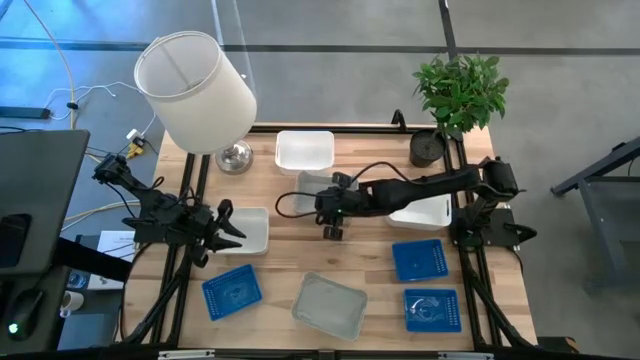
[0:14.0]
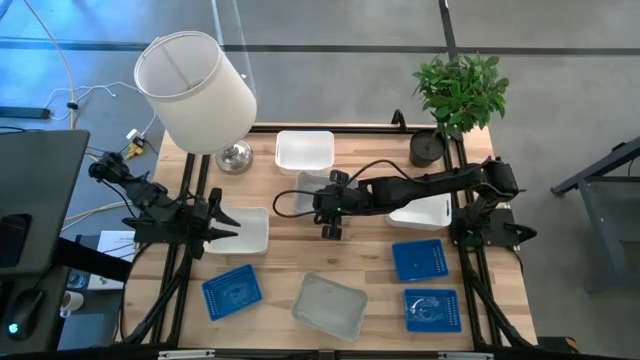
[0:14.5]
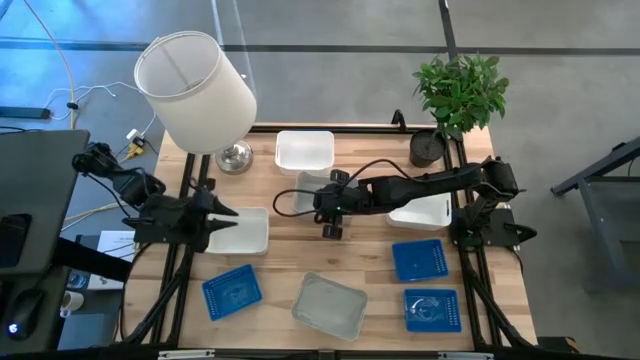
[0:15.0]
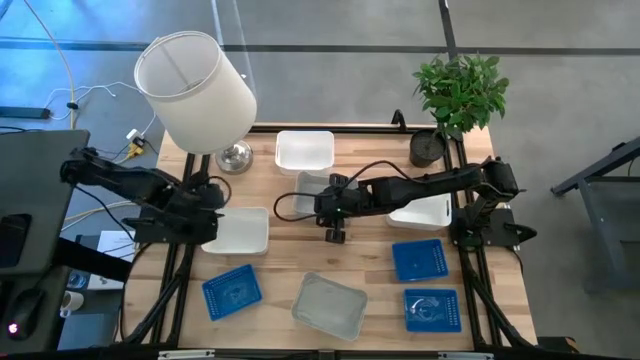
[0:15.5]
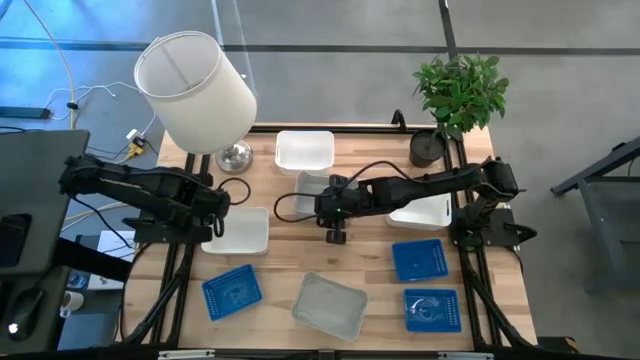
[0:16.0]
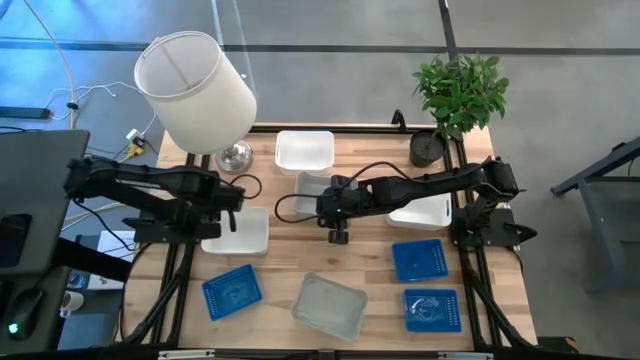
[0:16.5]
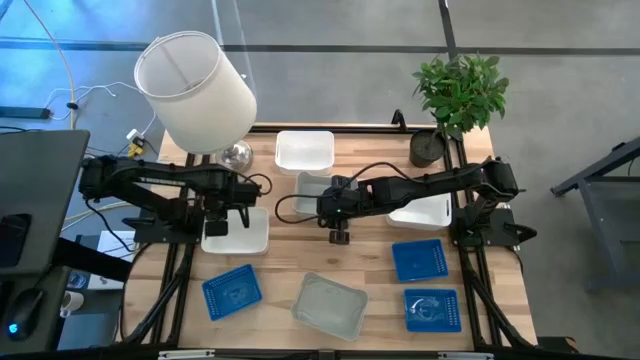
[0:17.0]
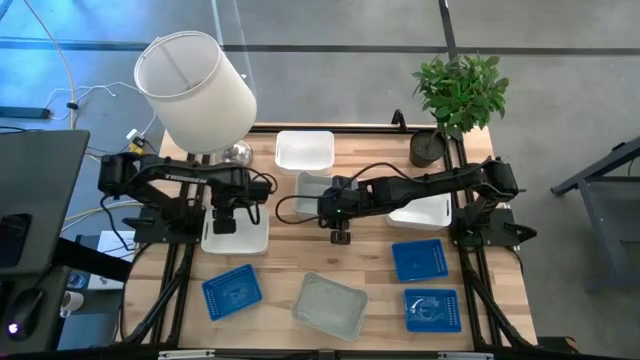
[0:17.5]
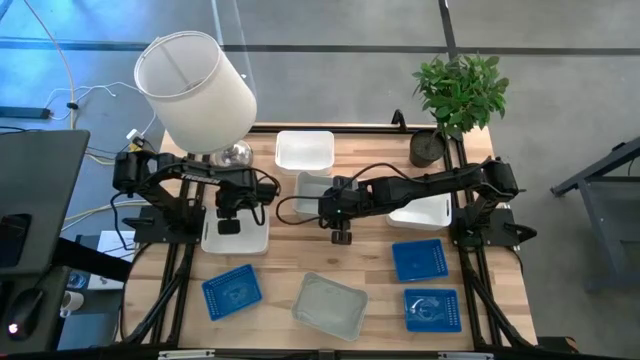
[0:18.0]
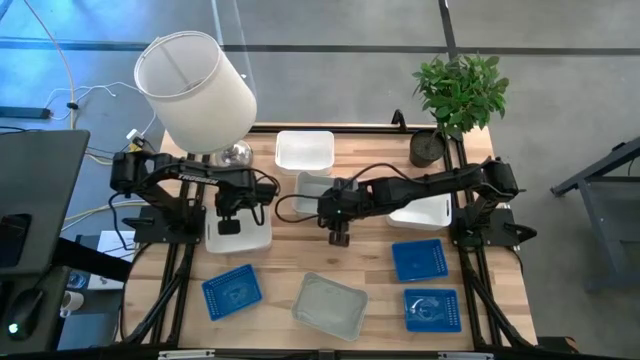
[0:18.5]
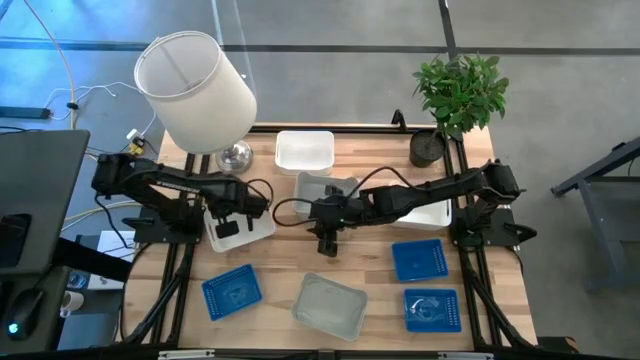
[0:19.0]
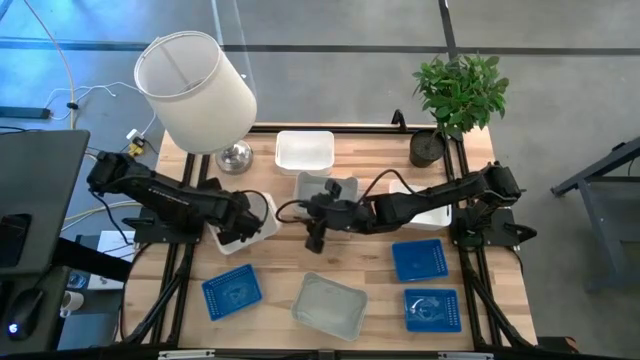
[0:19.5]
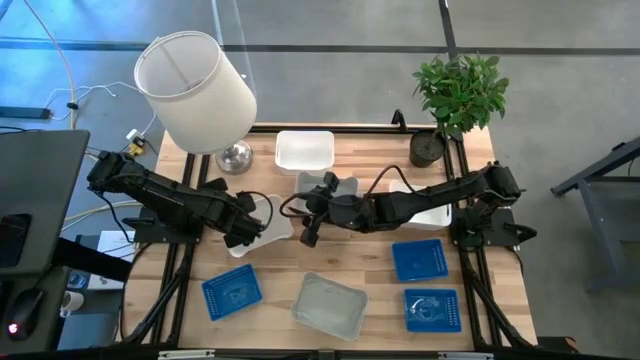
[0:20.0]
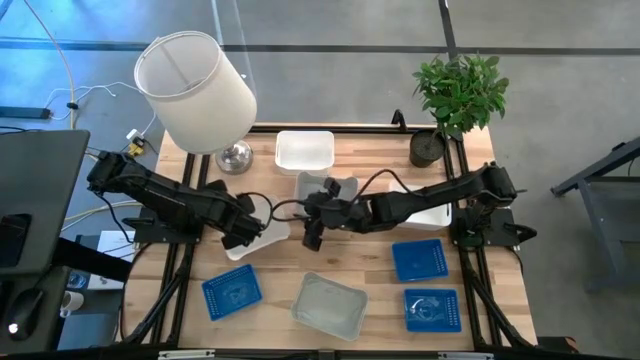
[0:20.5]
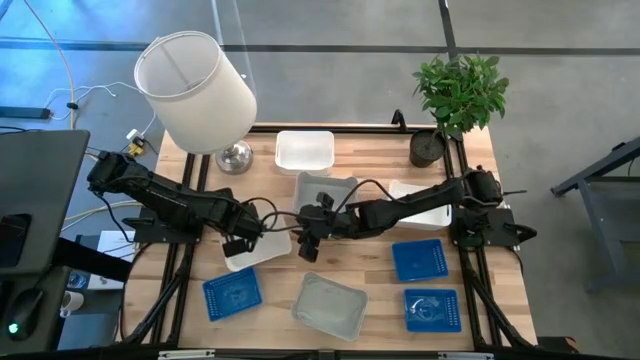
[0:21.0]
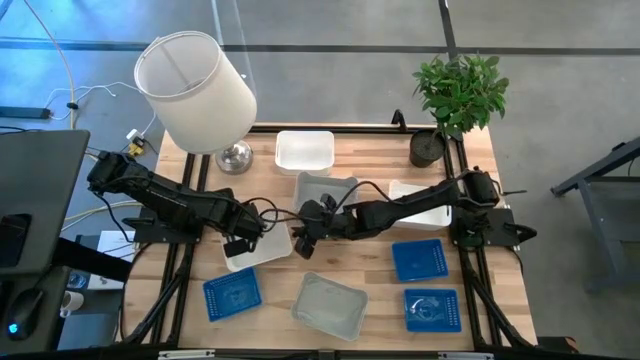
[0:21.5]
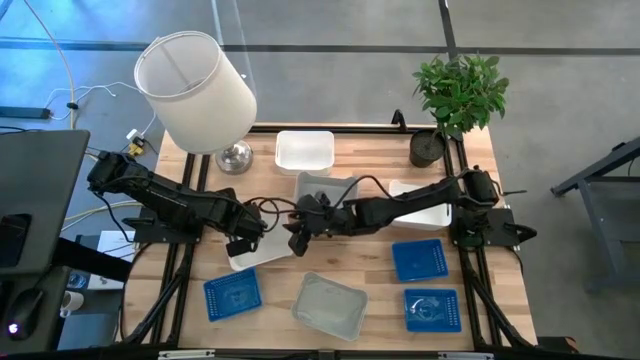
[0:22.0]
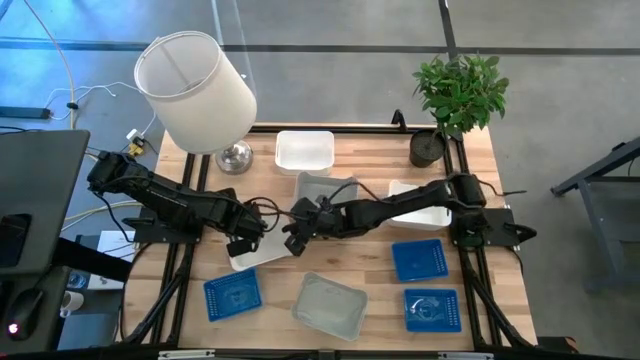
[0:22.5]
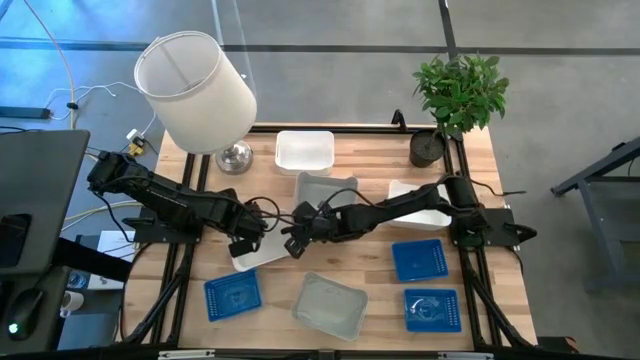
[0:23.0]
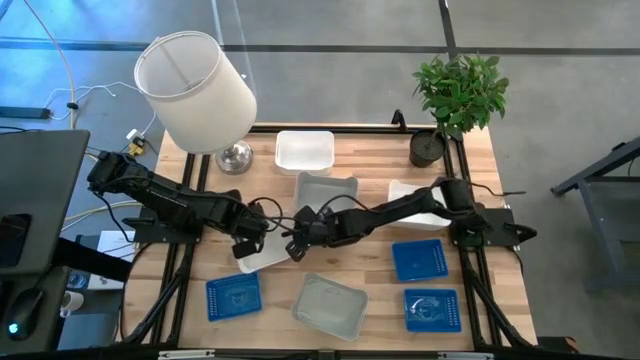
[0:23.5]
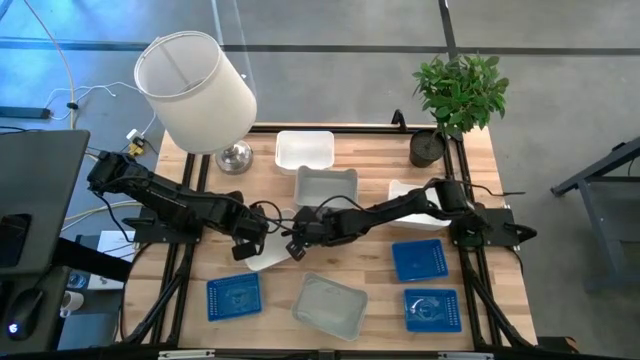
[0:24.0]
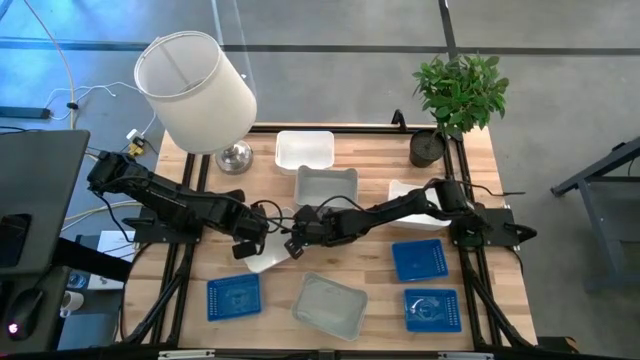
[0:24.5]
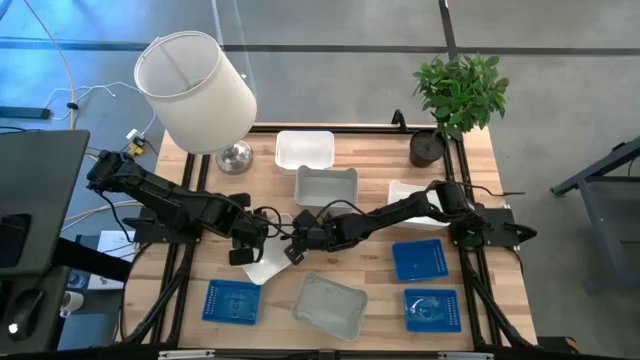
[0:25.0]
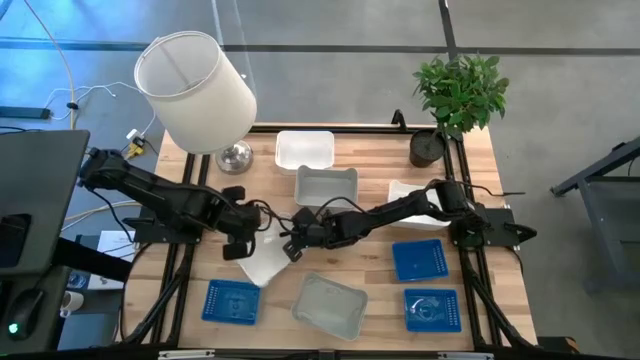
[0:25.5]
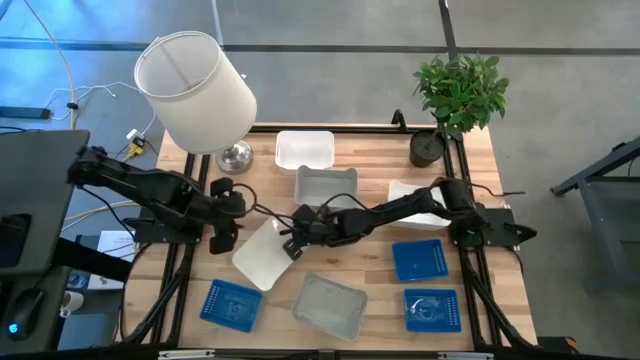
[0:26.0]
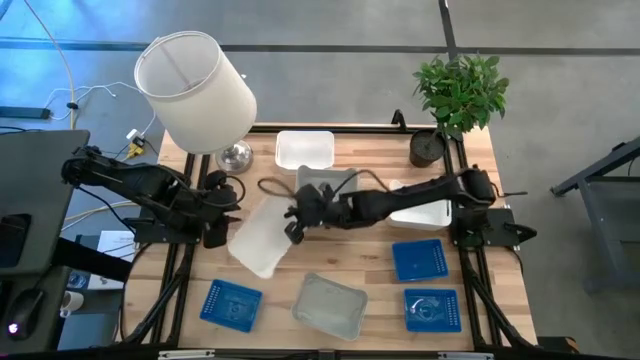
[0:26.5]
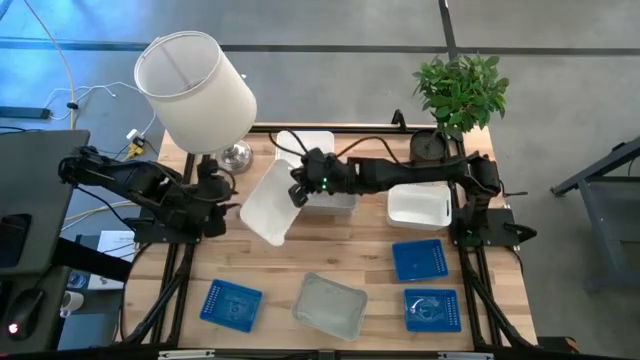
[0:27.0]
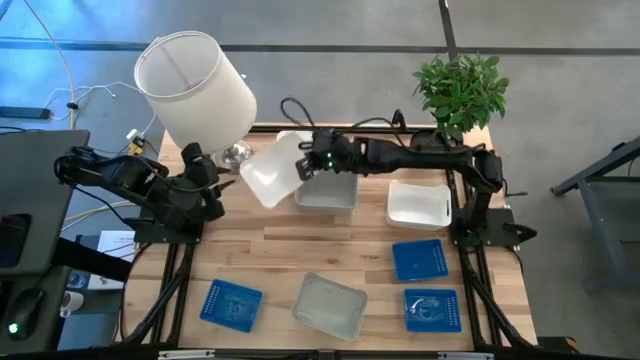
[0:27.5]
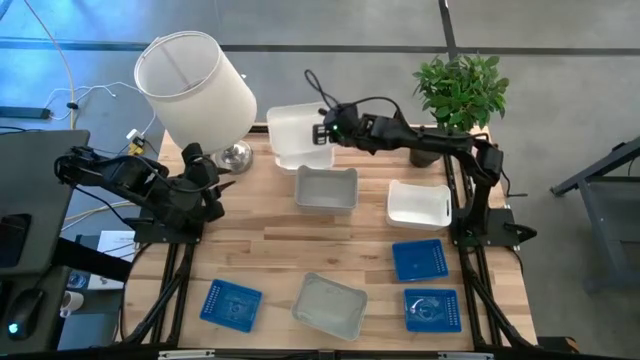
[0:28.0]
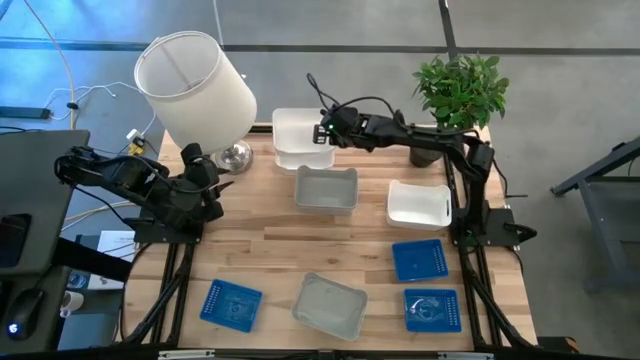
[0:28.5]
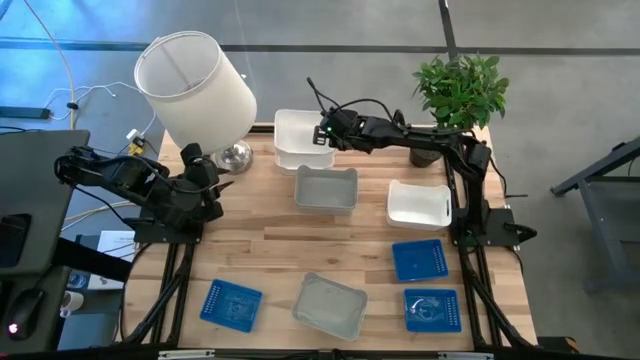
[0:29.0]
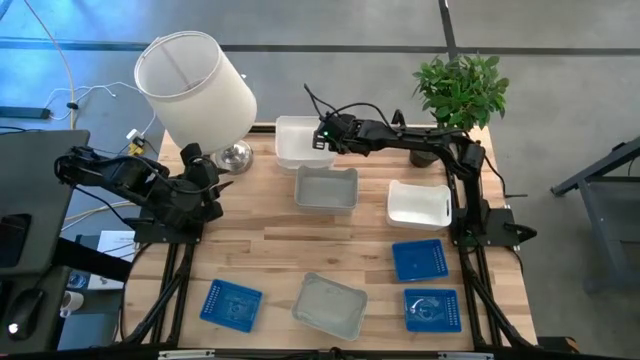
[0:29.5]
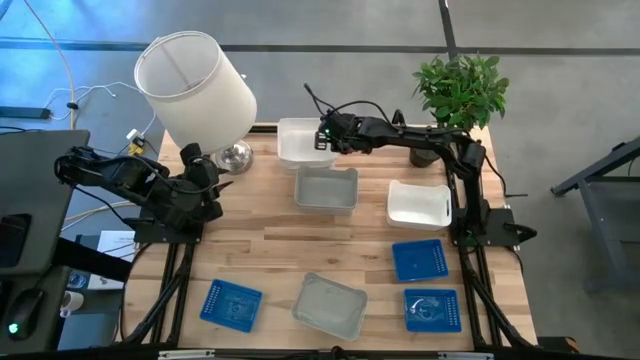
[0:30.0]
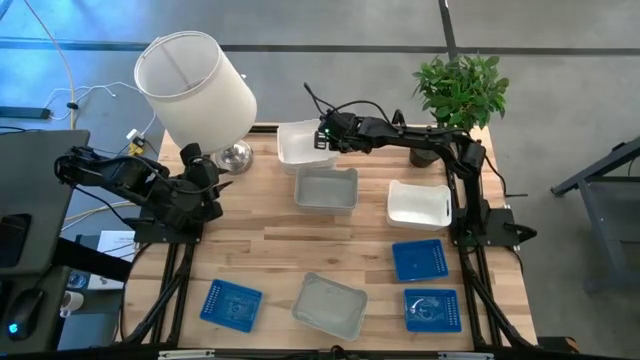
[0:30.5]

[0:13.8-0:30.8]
Stack the bottom white bin on top of the top white bin

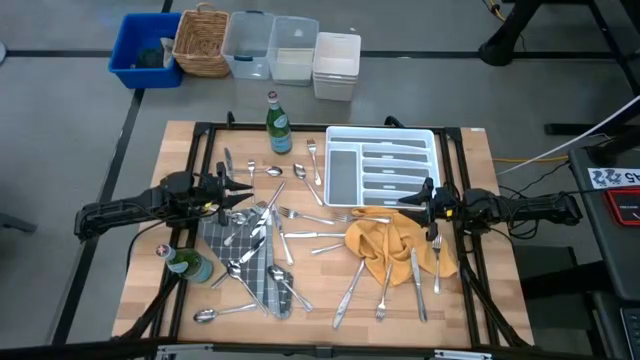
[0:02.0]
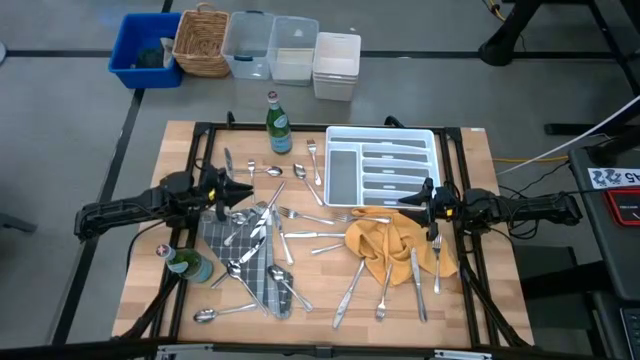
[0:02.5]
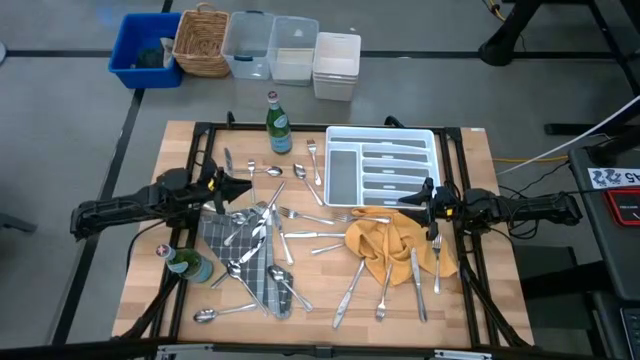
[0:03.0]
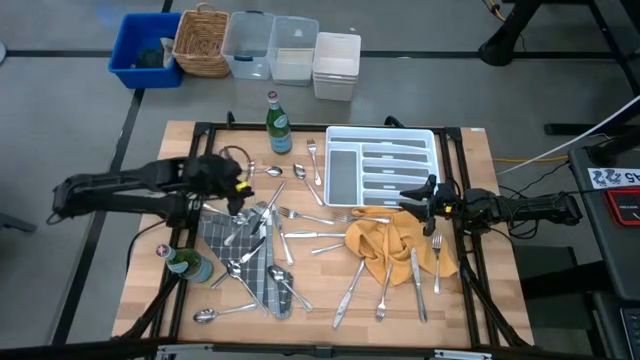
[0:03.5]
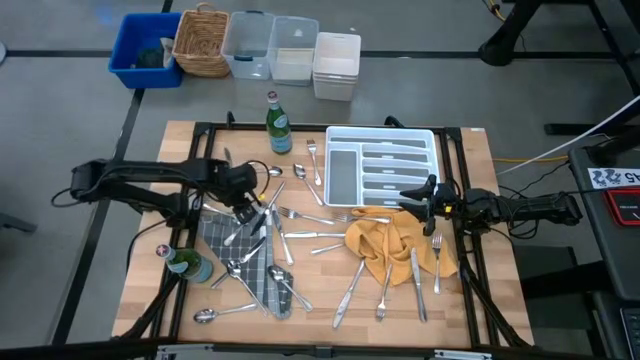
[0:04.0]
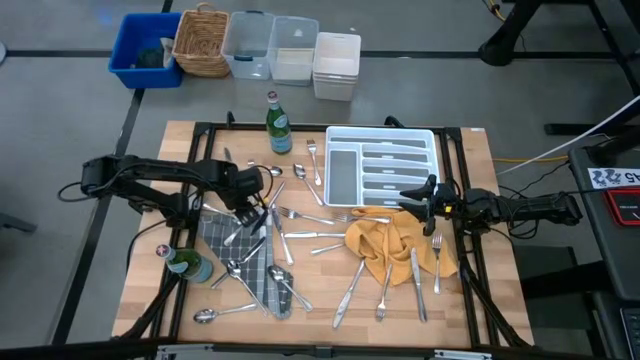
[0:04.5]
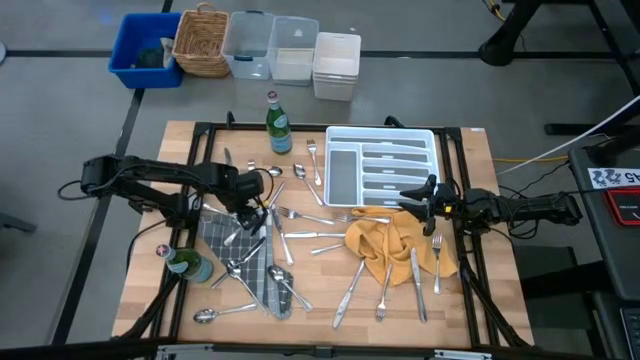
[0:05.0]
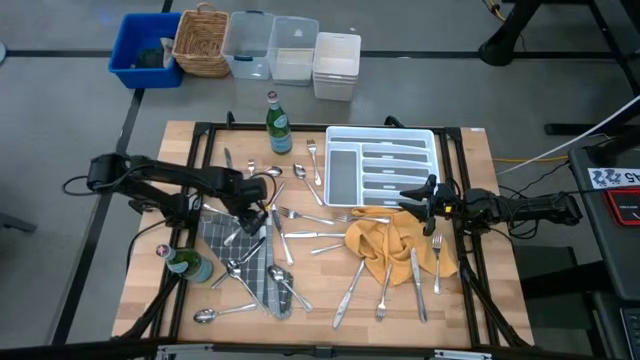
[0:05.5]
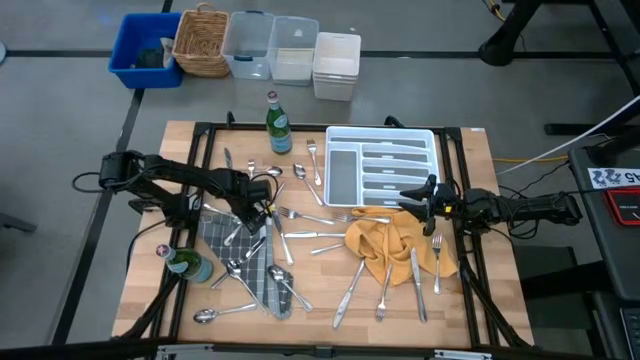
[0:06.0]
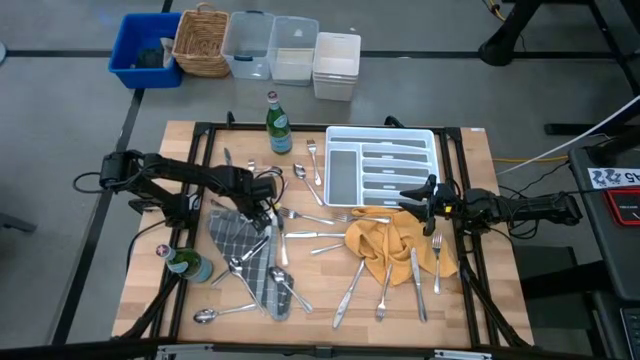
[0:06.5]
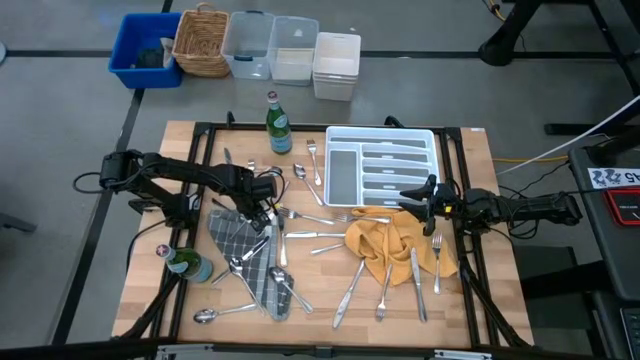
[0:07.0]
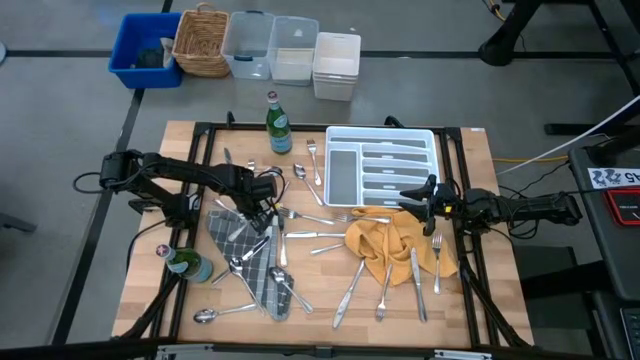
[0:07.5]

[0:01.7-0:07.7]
Put the silver fork into the cutlery tray
